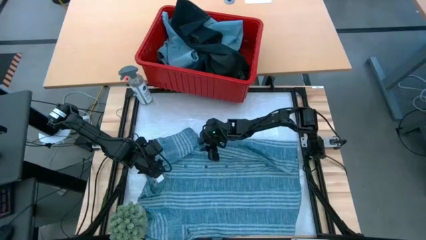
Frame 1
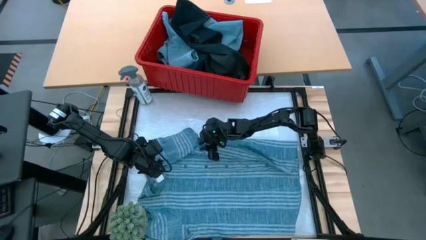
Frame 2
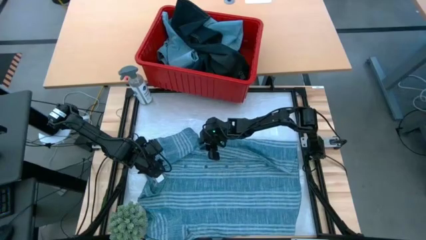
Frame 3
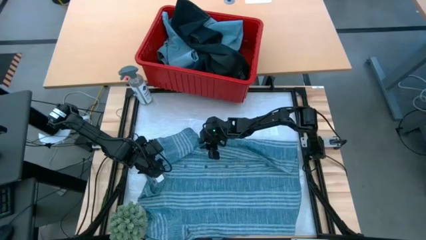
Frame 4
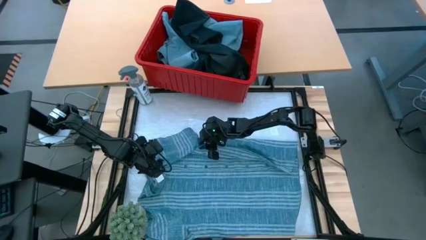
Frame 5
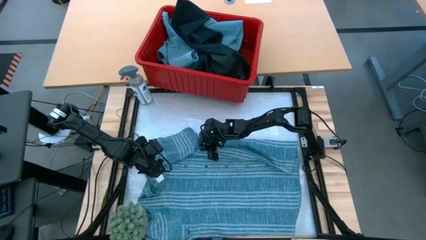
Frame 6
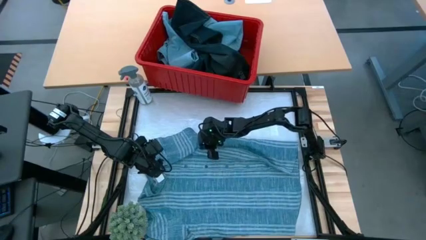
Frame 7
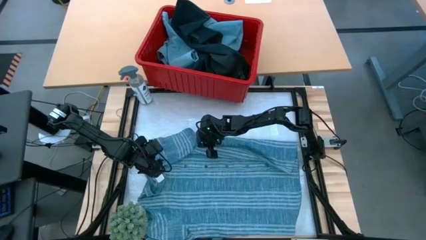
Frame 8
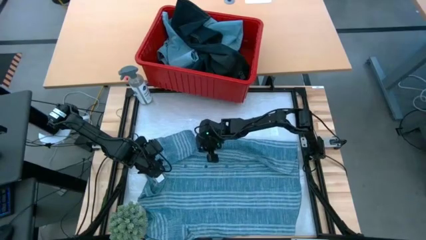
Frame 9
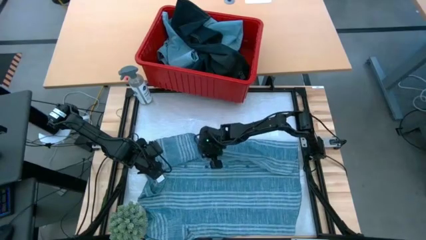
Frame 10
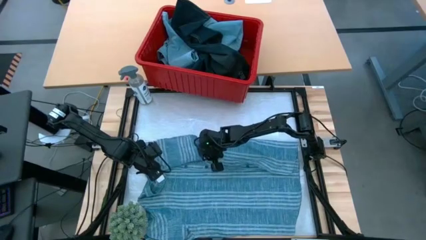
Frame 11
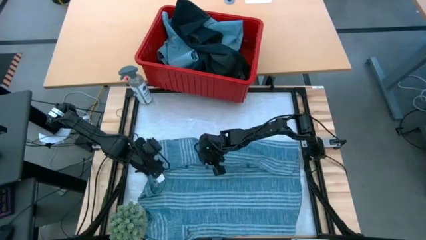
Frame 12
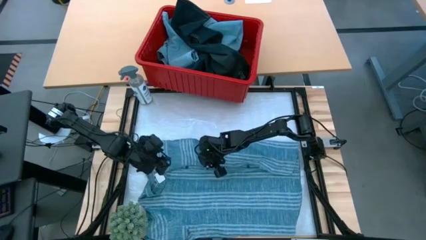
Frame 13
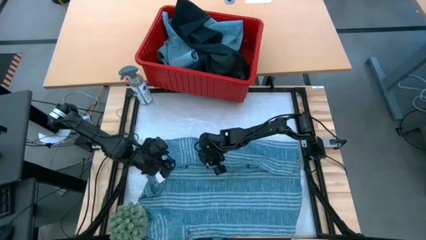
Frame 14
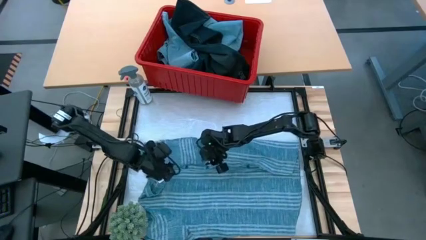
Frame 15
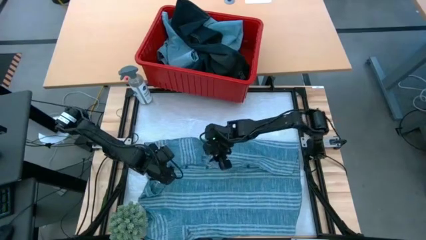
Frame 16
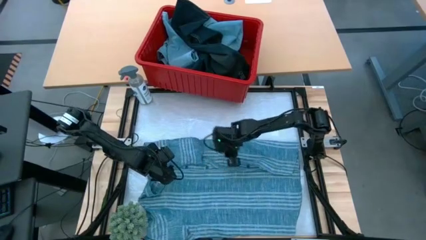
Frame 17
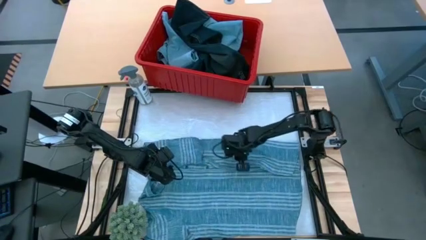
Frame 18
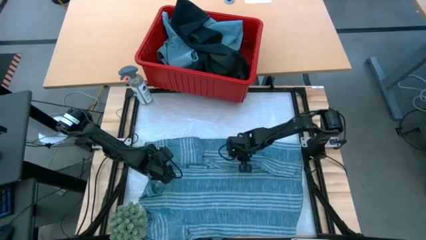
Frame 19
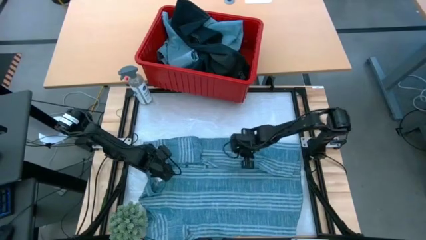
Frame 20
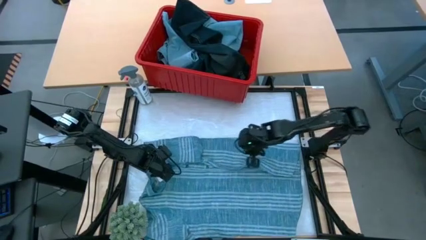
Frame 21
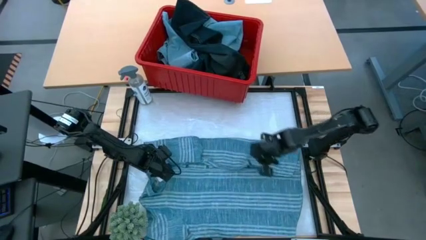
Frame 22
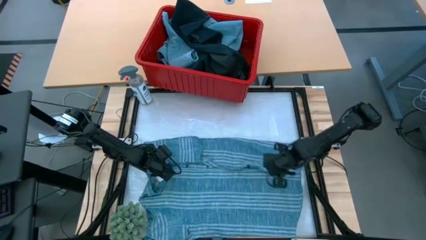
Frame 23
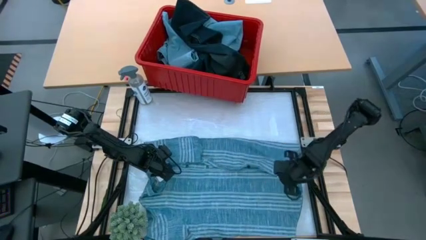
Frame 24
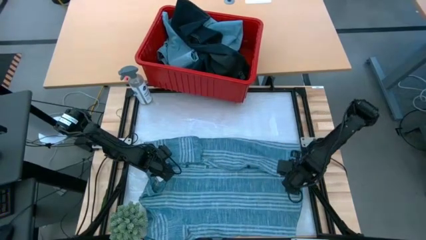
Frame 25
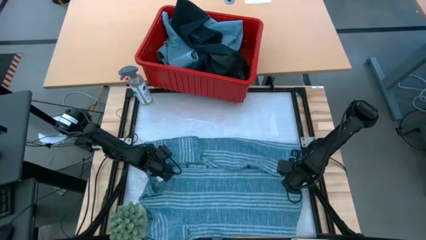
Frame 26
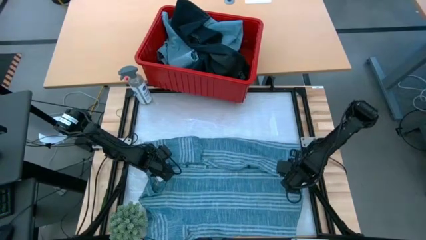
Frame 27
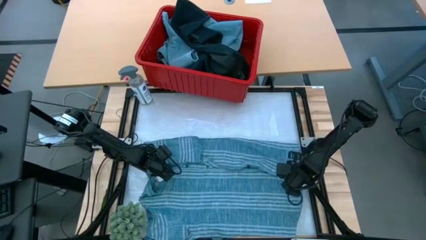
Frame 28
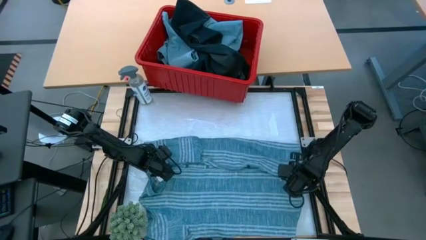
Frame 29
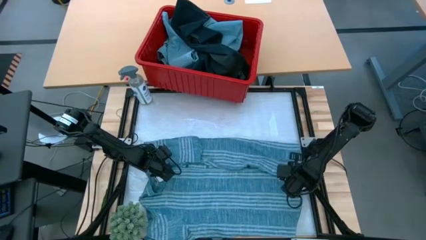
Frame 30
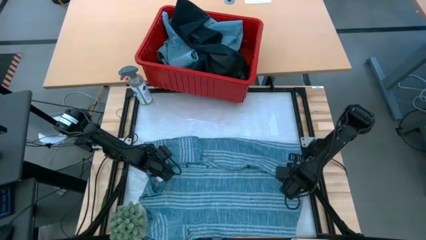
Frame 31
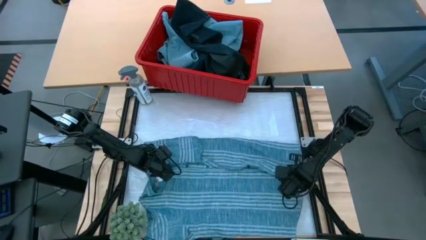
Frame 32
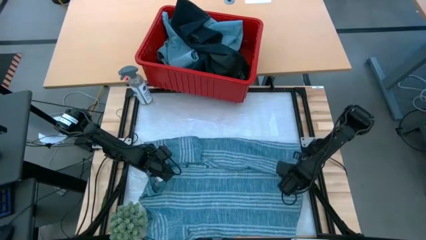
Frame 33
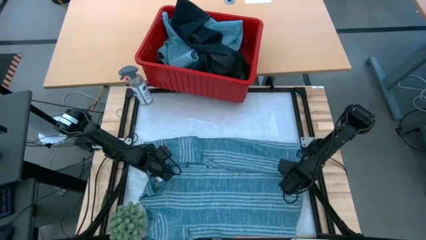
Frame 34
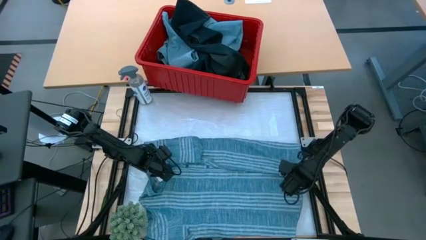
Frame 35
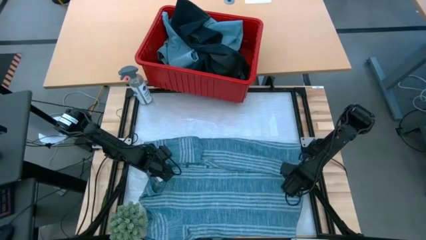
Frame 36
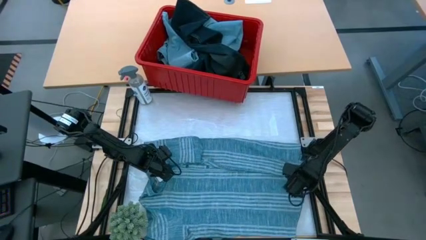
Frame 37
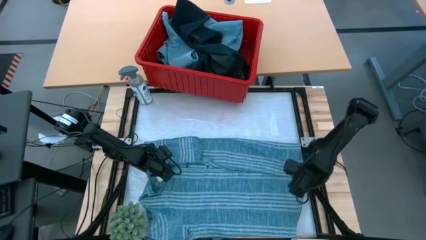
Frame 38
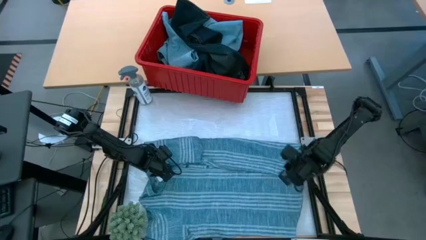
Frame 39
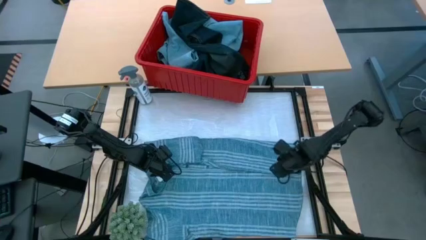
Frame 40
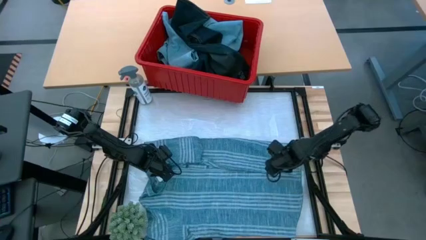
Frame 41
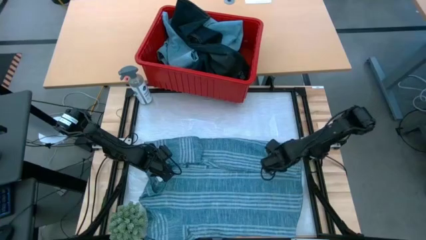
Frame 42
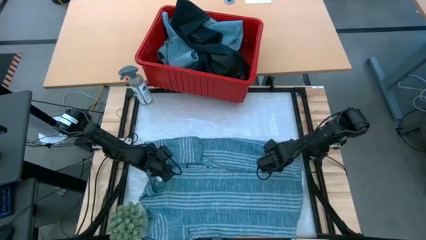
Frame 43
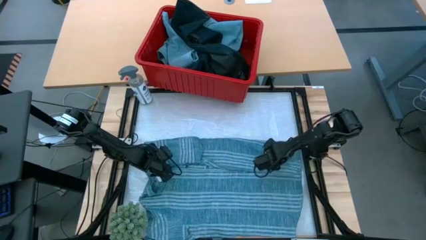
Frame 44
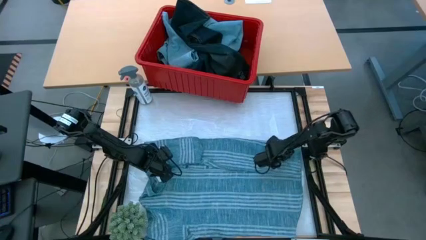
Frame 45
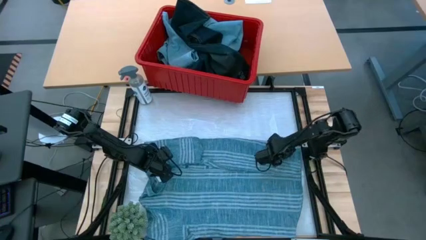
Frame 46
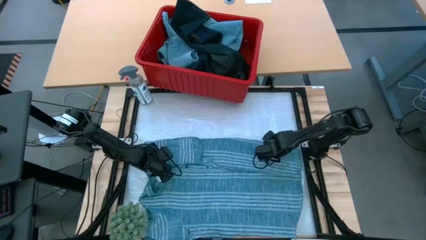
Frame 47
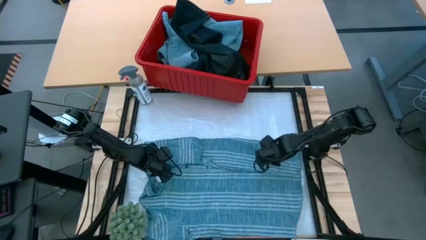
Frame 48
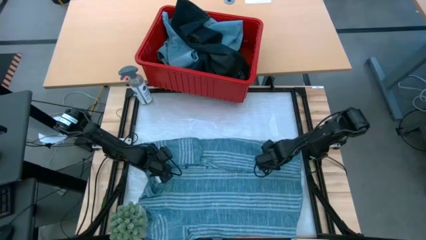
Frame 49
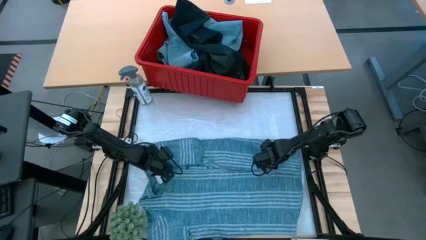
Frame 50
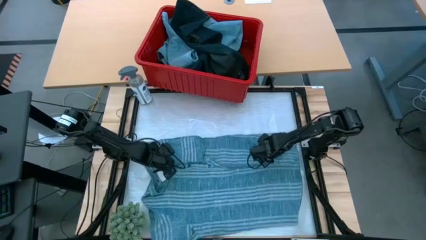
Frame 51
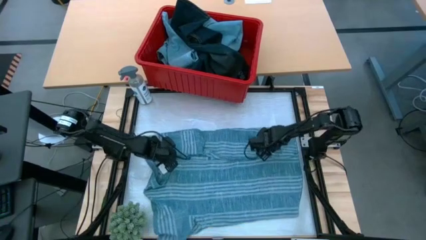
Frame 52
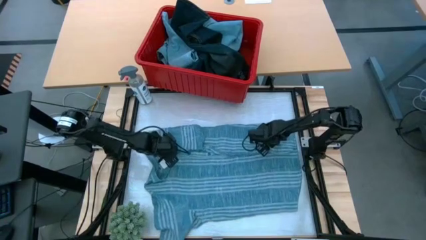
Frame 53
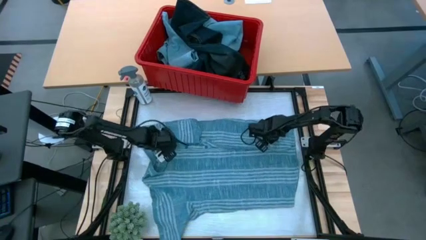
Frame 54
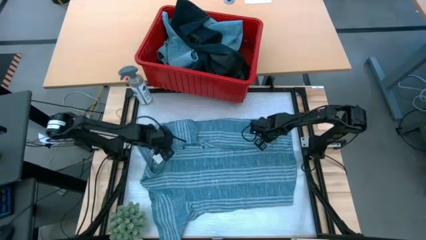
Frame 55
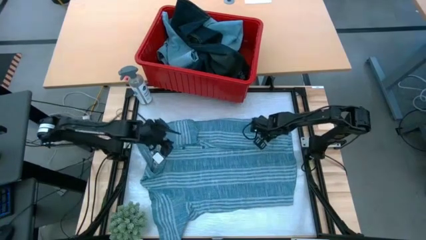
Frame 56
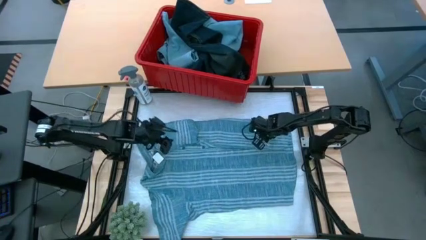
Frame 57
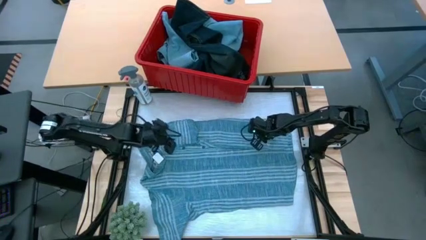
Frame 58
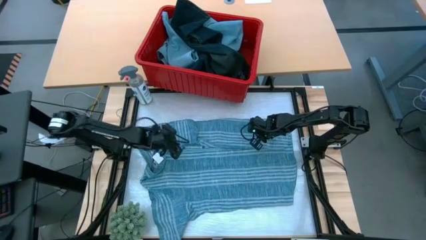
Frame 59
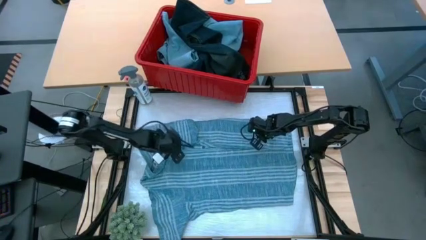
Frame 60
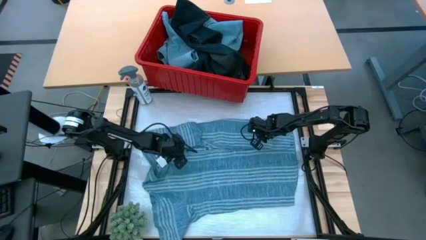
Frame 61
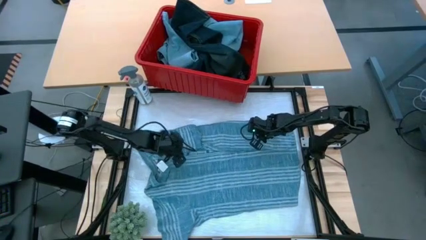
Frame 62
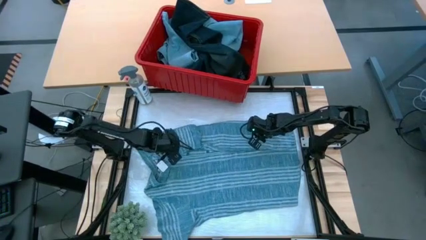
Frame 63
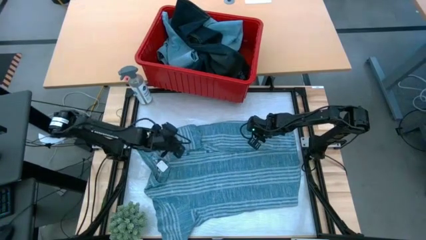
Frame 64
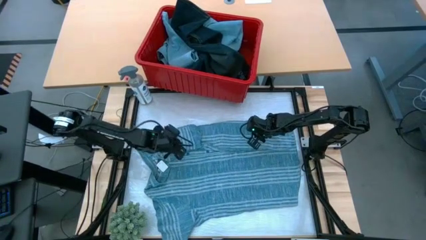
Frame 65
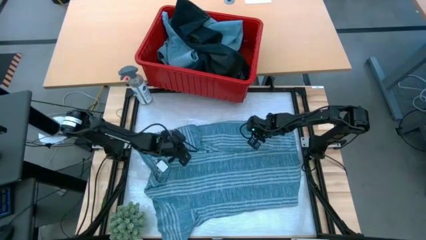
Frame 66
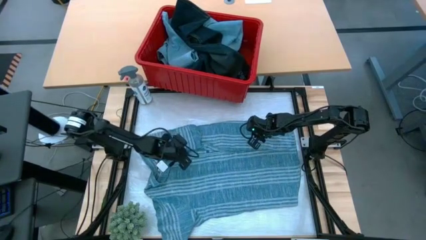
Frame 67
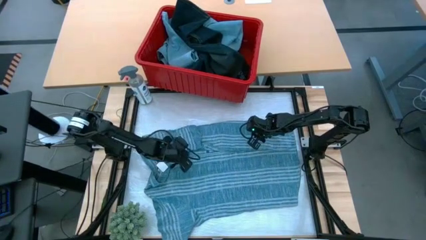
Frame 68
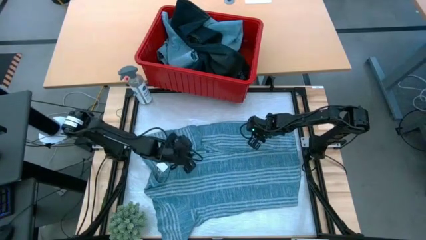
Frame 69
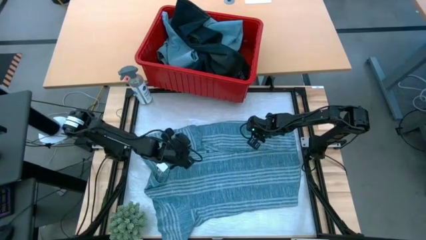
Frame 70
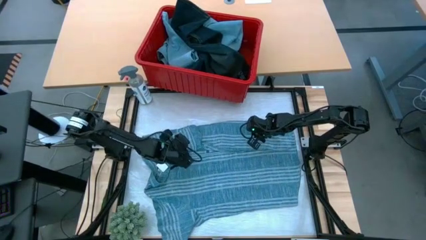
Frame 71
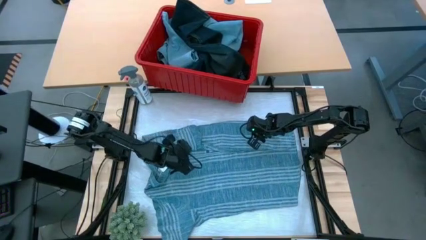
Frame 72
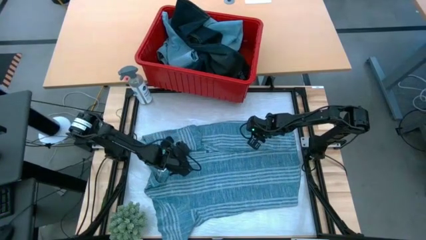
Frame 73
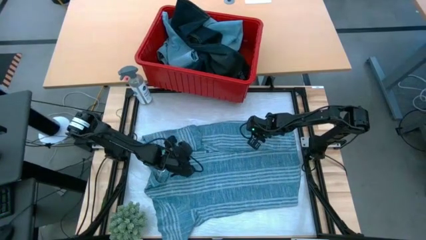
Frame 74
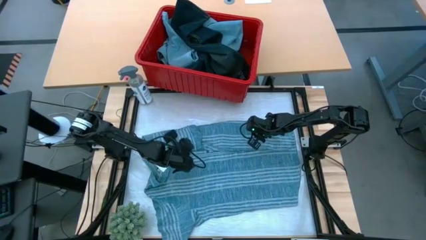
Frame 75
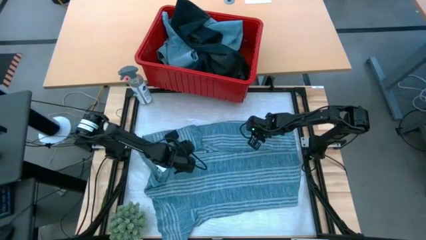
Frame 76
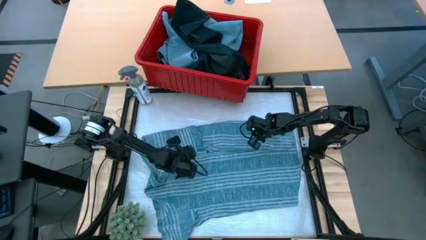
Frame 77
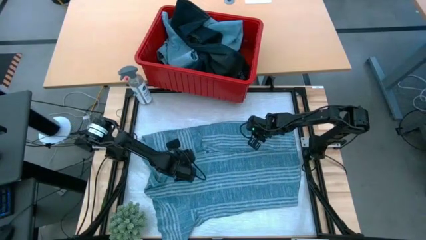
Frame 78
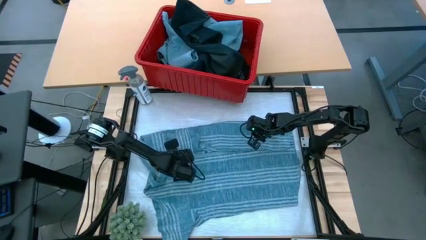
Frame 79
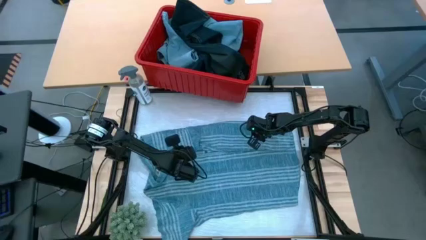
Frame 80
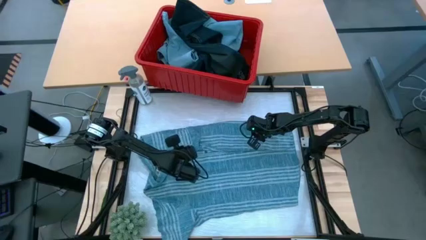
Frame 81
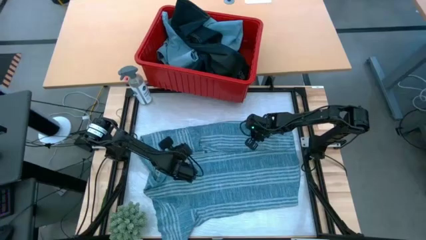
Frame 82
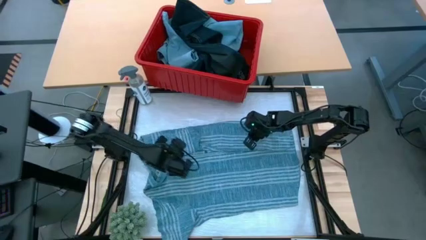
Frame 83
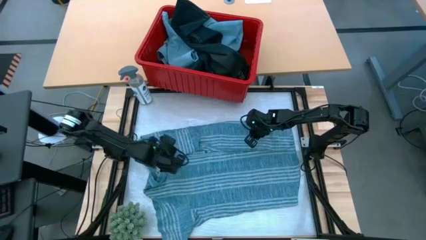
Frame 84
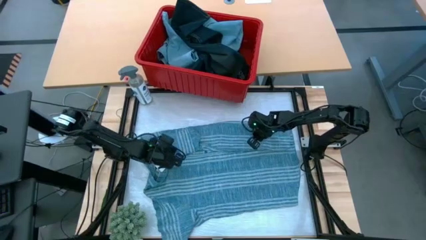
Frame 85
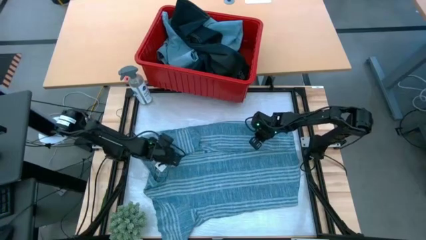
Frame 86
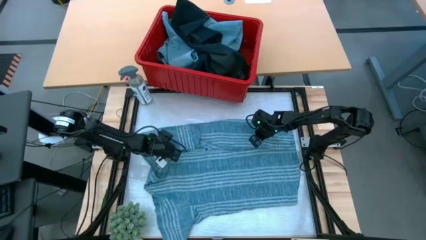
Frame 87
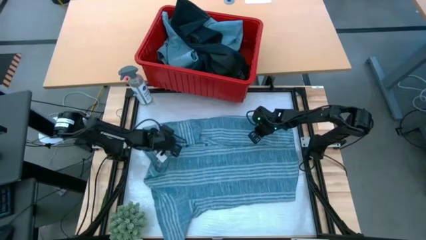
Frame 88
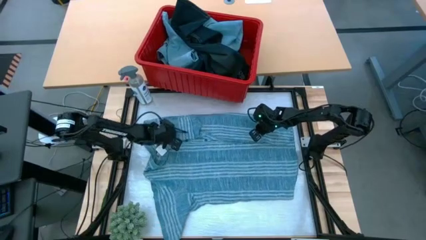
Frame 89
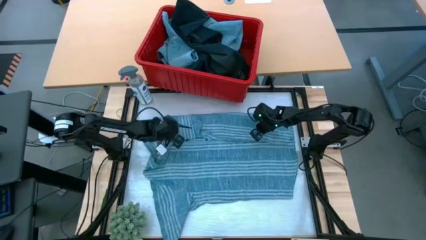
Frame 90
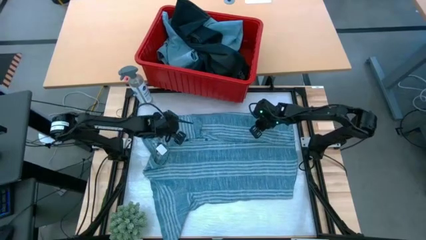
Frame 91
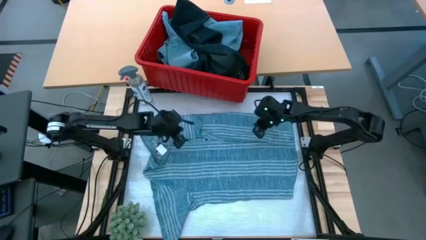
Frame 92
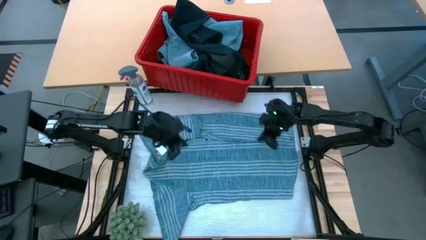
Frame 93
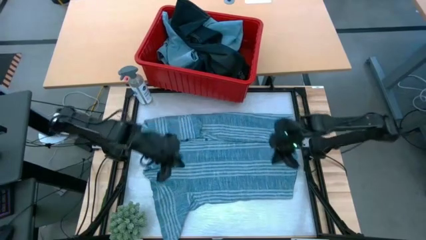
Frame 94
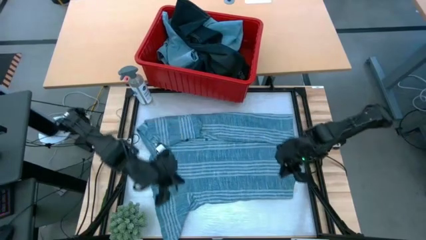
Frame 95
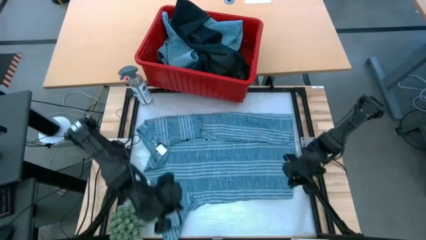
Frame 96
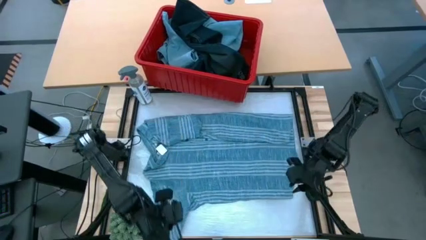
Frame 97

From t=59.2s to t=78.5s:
Task: Fold Laundry from Bin
Fold the light blue shirt
